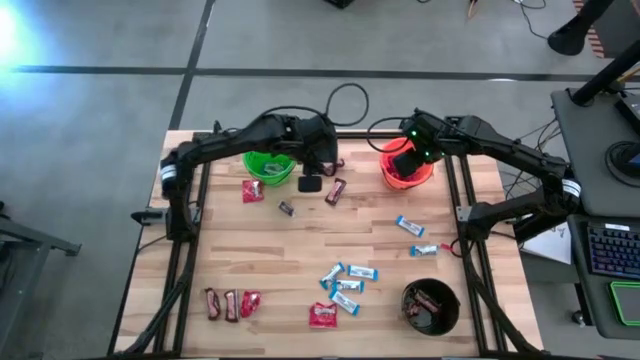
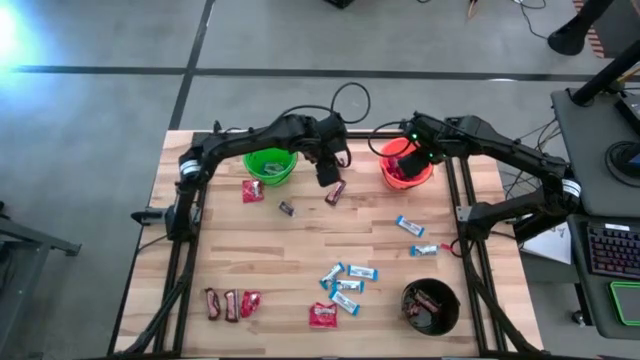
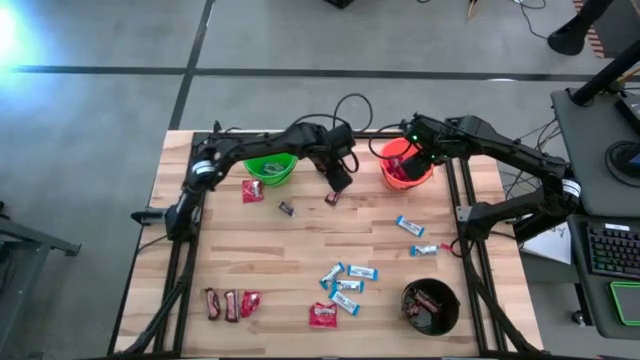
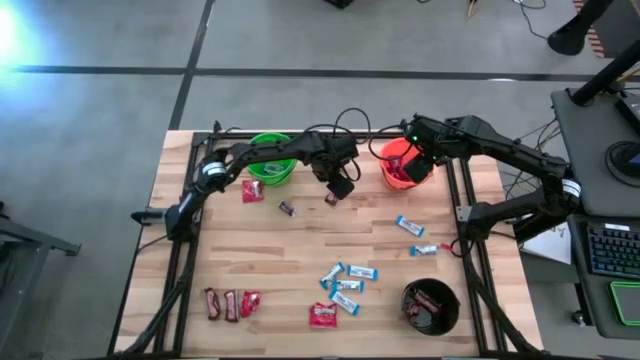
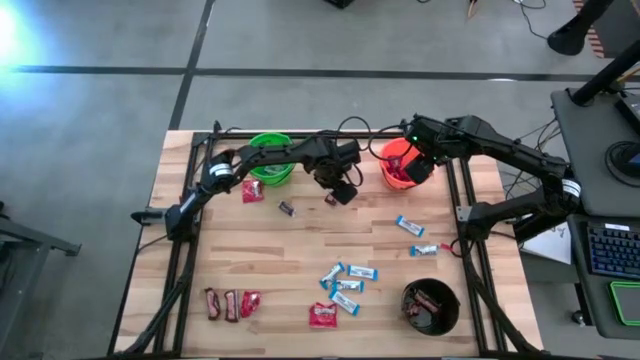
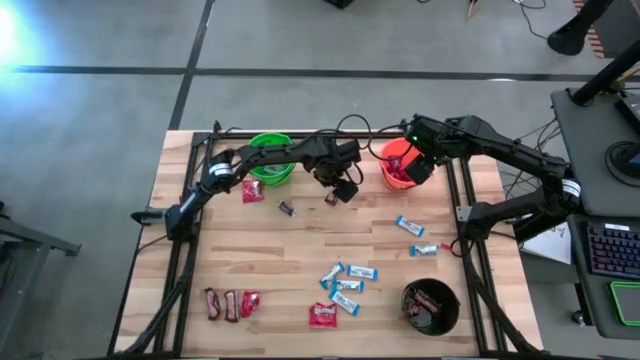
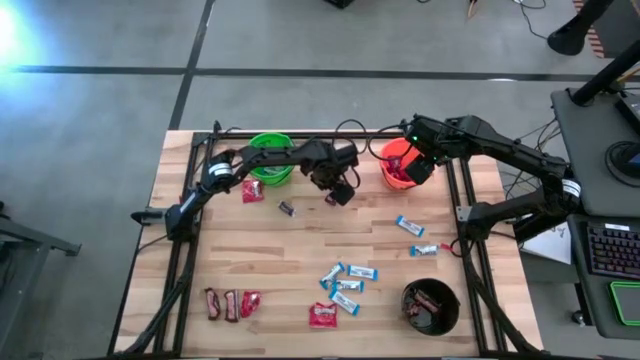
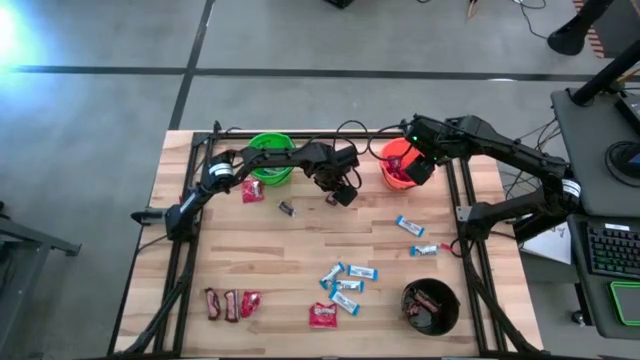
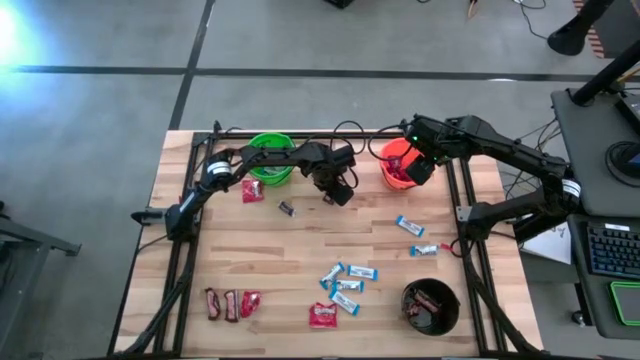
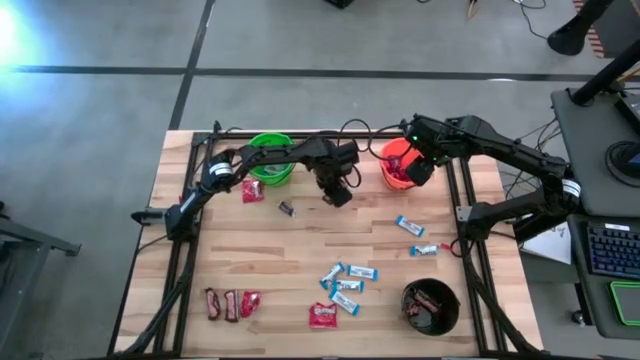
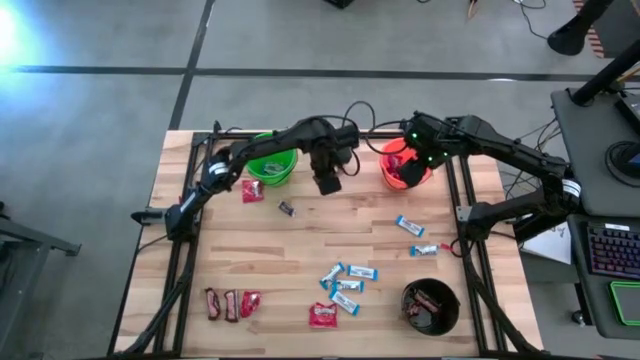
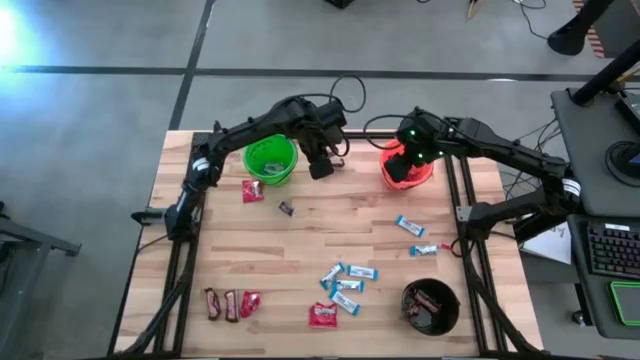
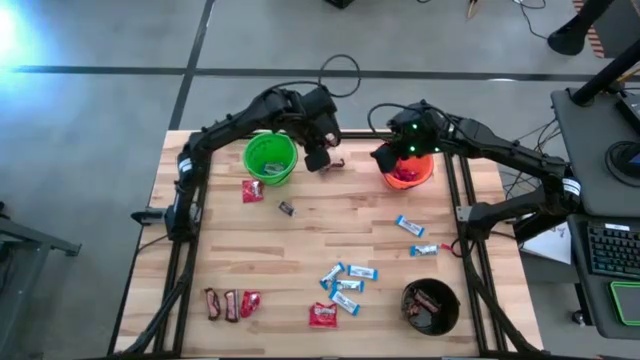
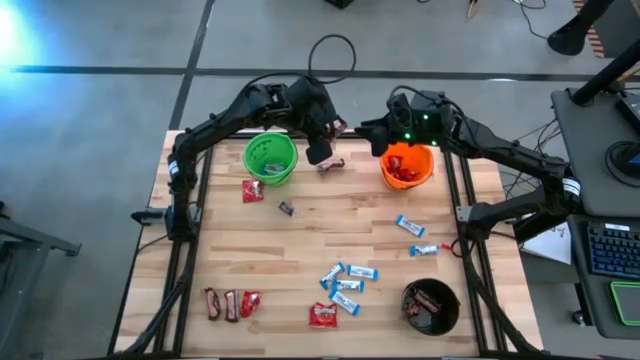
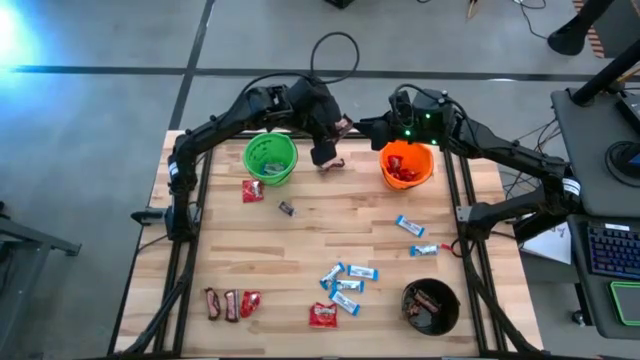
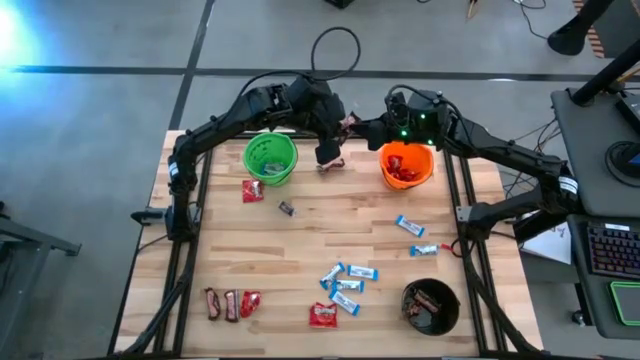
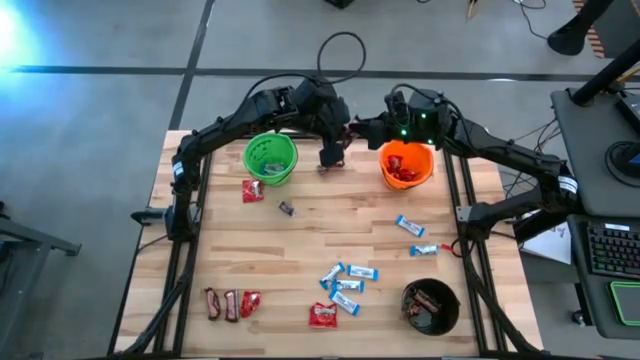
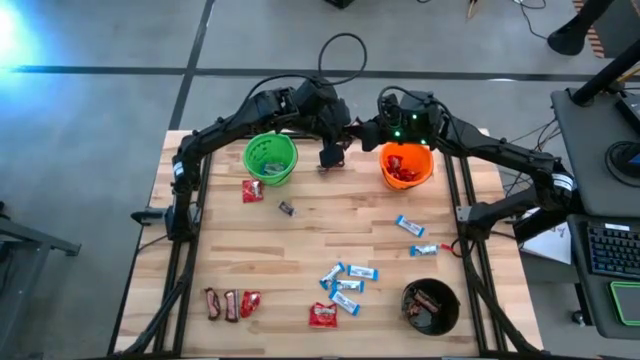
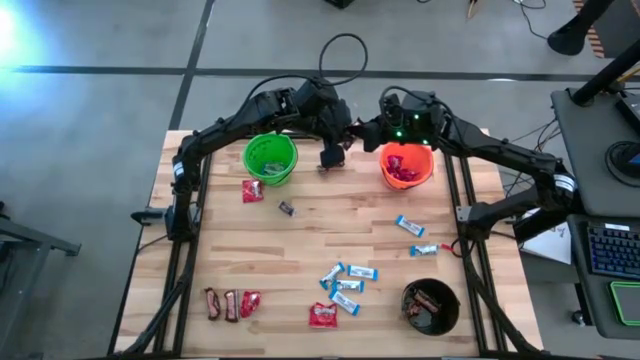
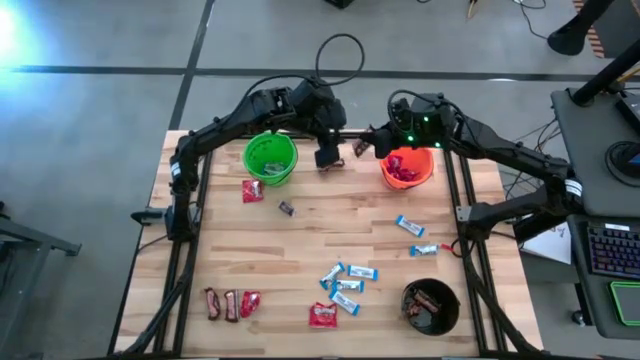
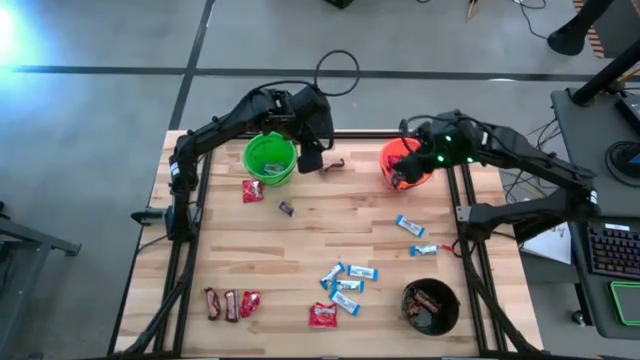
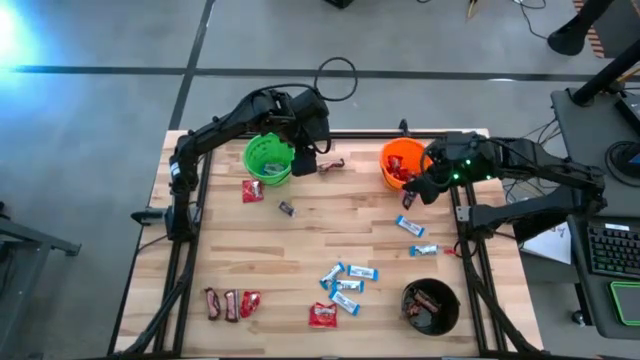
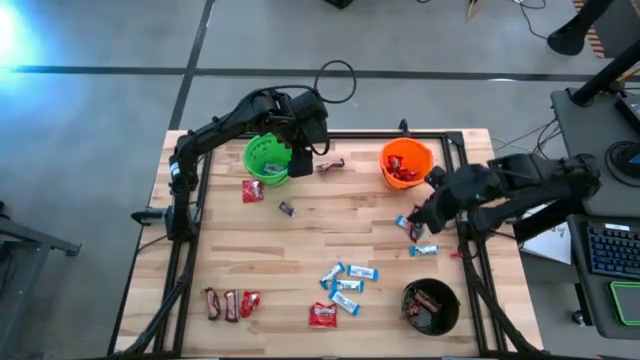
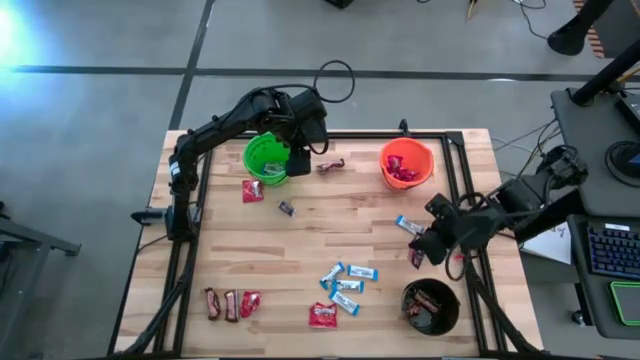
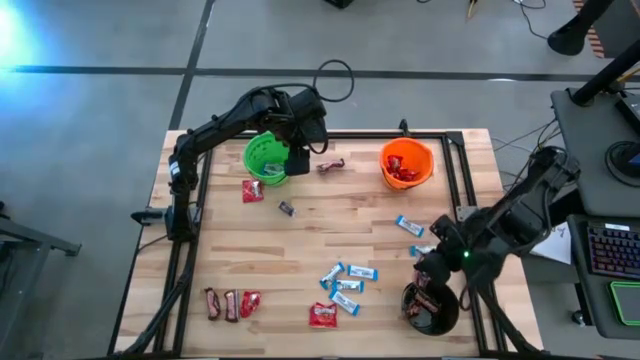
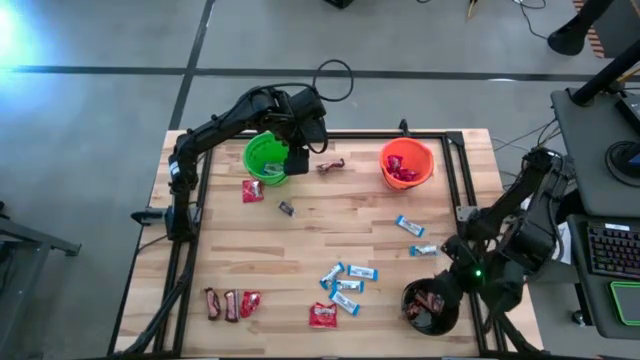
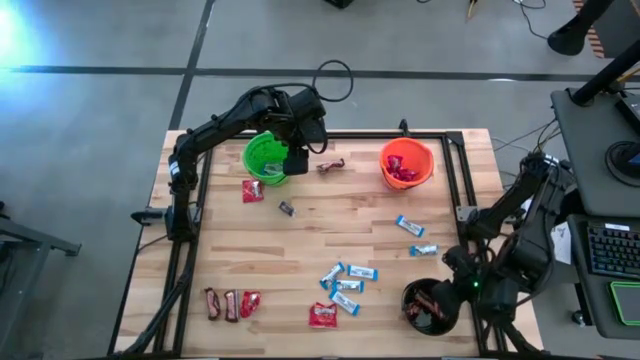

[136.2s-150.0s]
Task: Sort candy
Put the brown candy into the black bucket

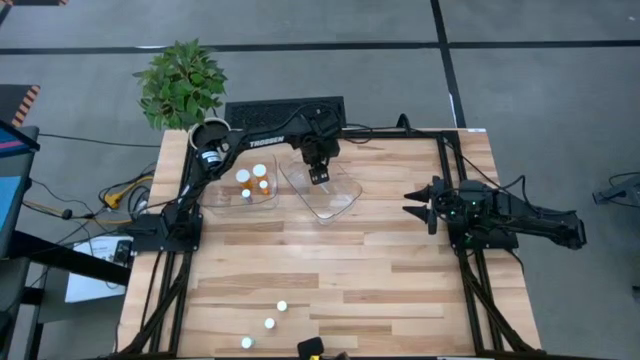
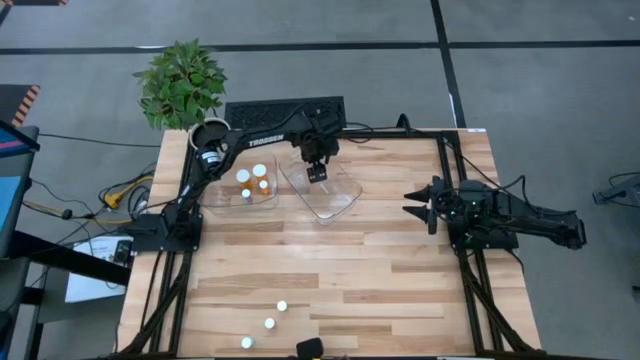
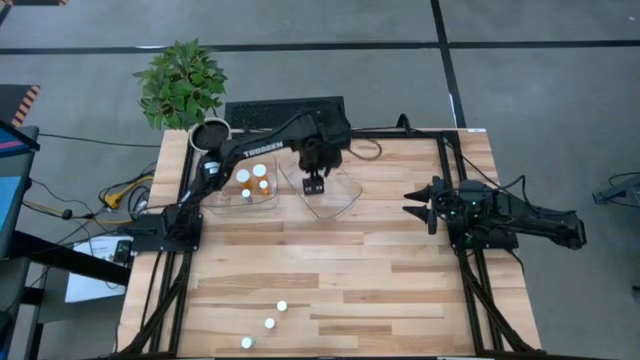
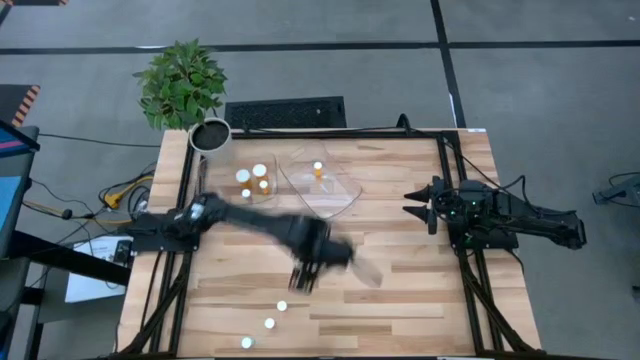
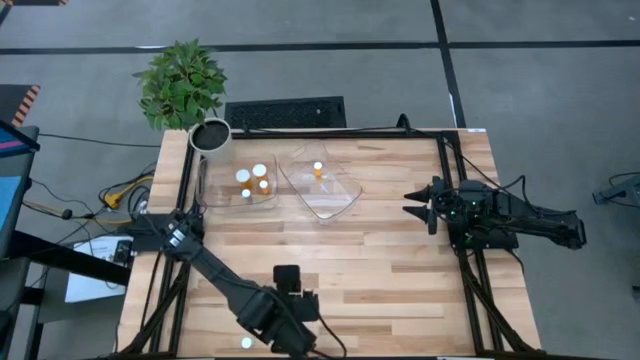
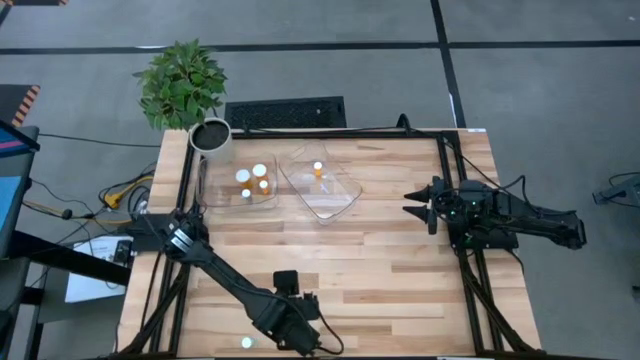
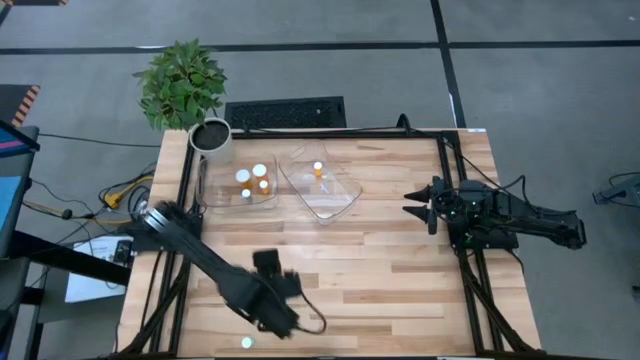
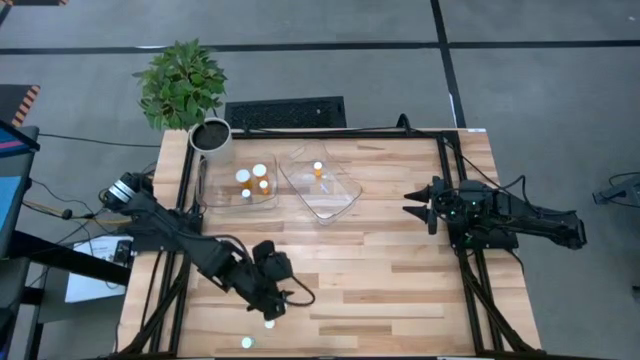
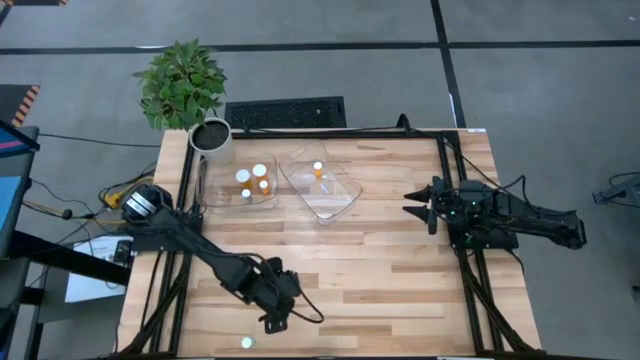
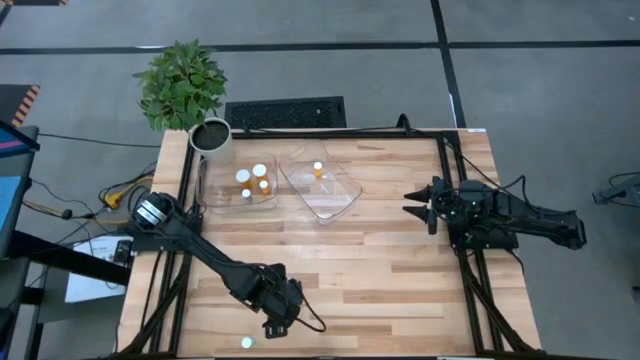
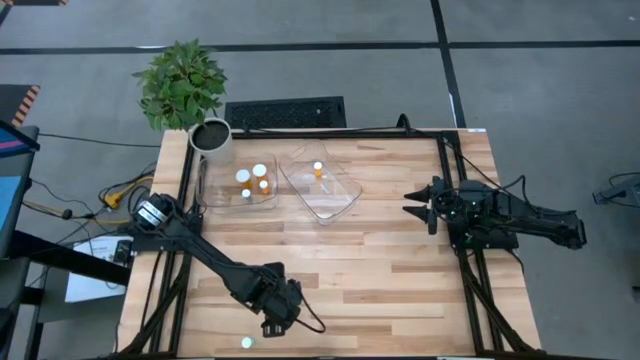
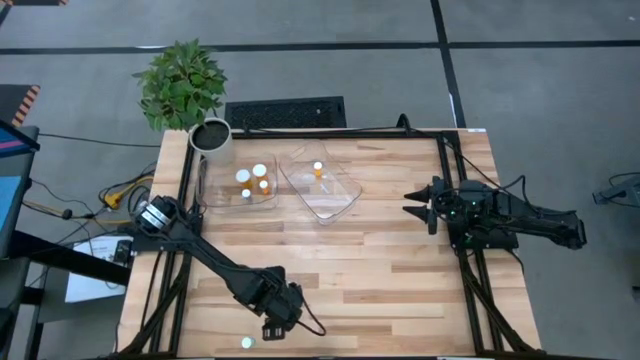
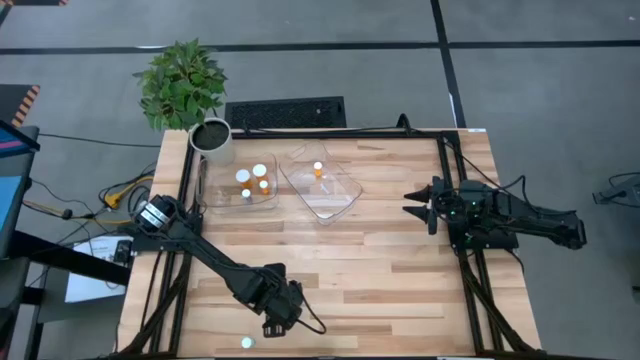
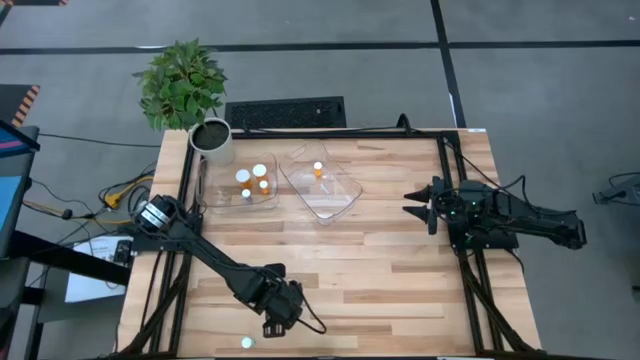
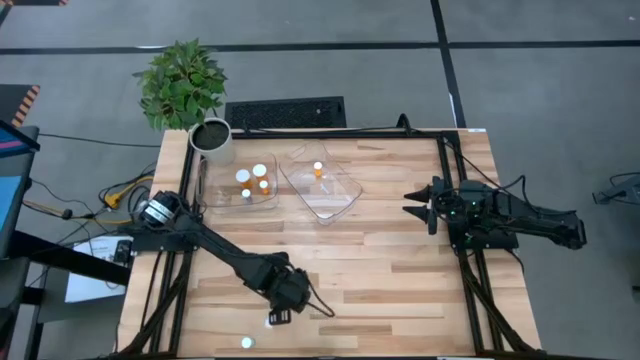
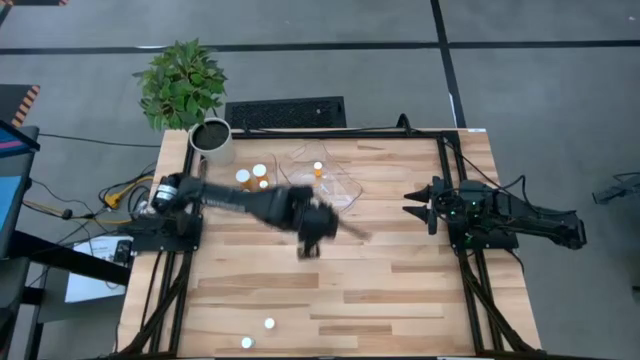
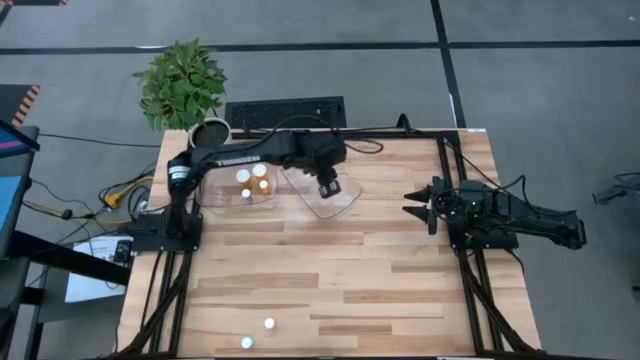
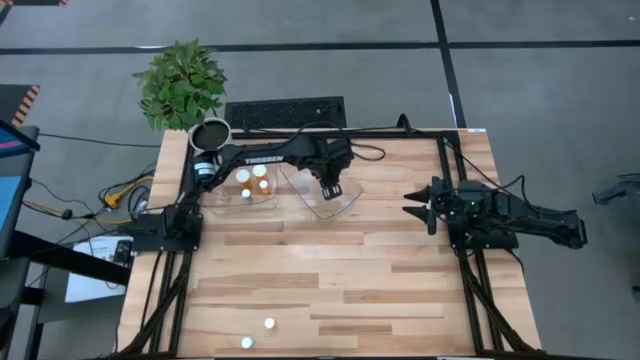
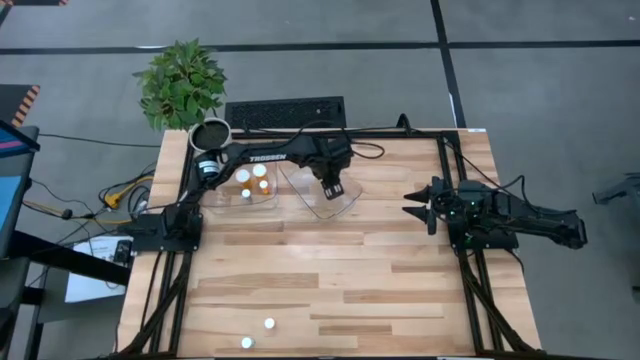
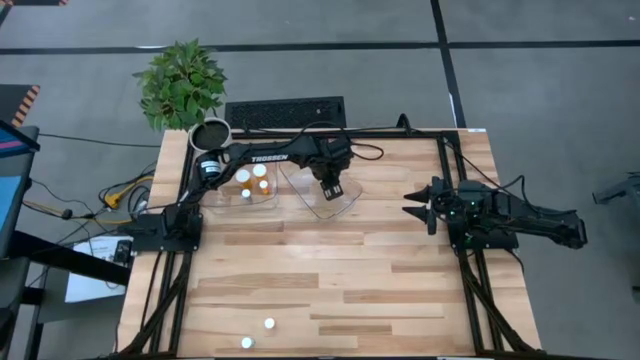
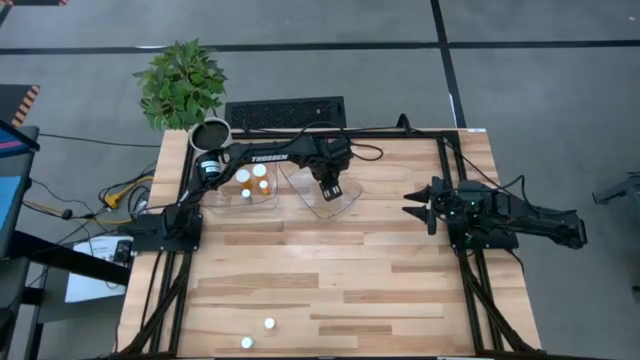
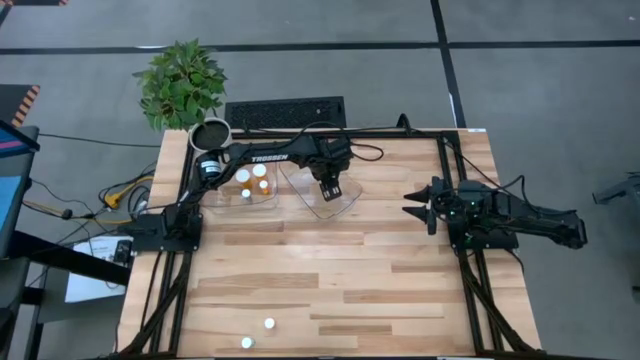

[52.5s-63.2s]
Task: Pick and place medicine bottles into bin by pill shape (circle, oval)
Put the small yellow tablet bottle into the right transparent bin
